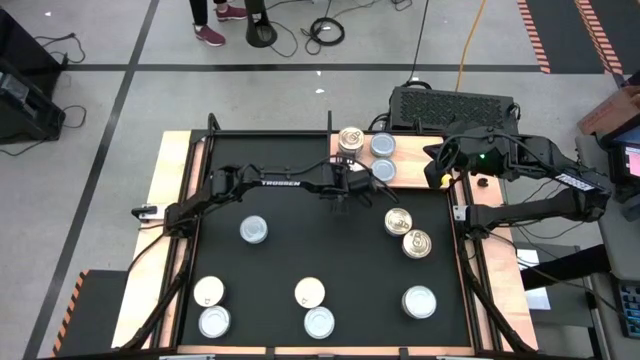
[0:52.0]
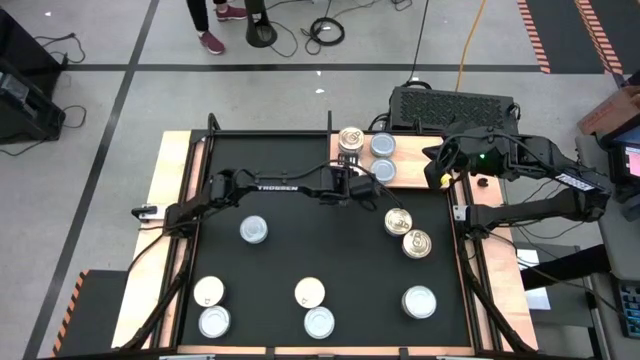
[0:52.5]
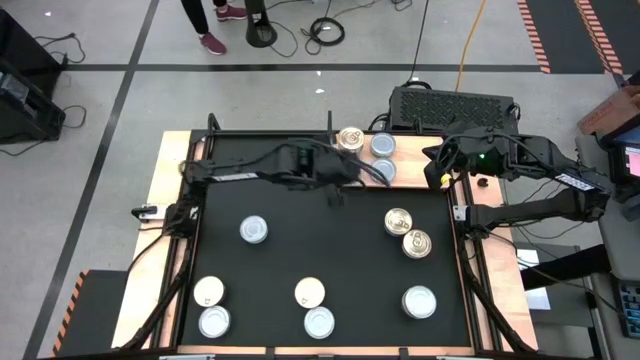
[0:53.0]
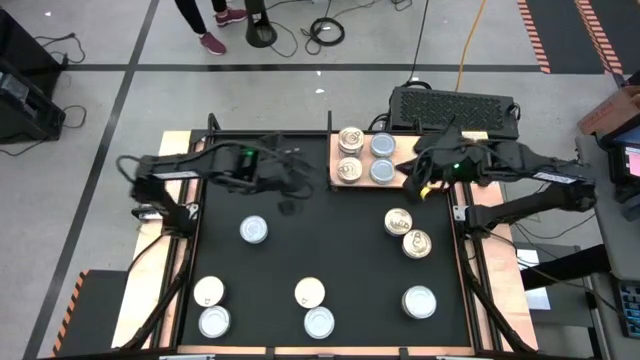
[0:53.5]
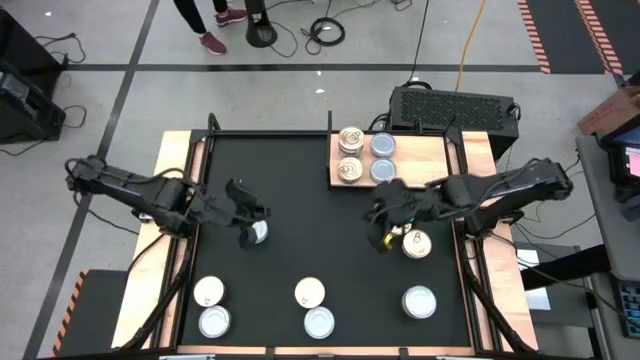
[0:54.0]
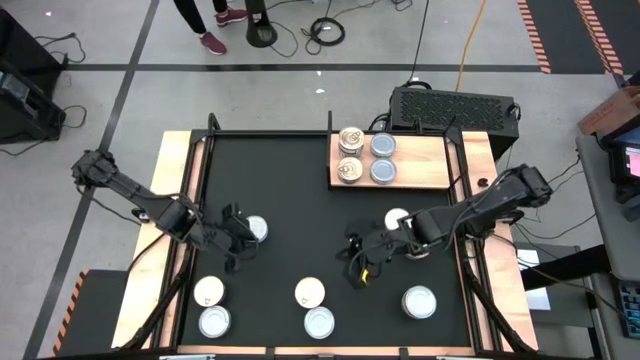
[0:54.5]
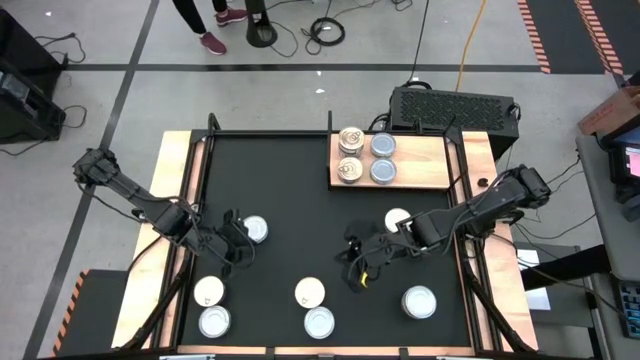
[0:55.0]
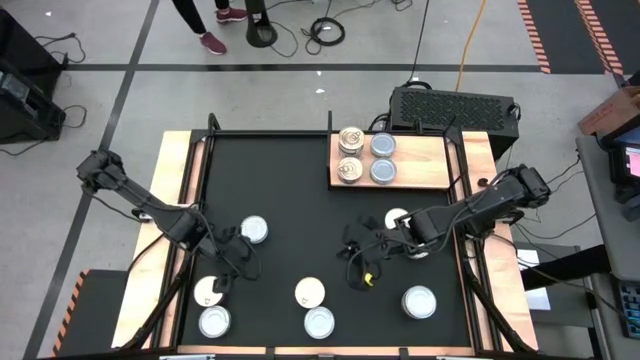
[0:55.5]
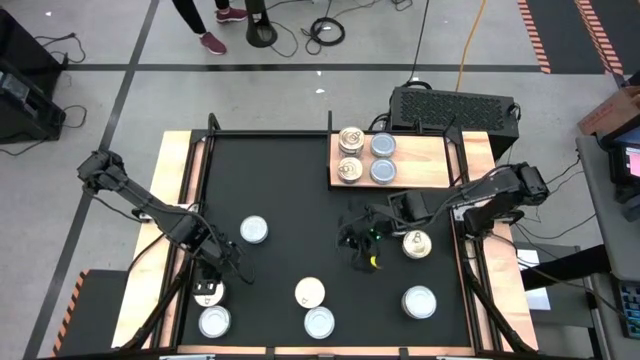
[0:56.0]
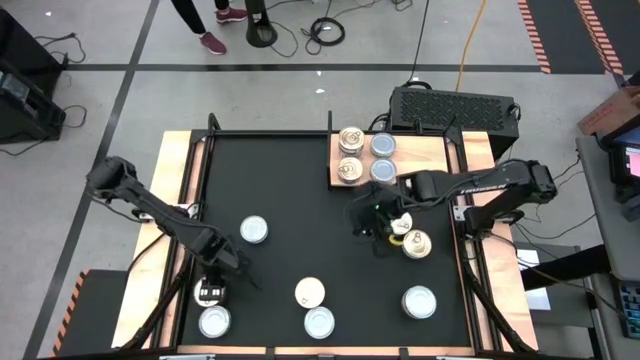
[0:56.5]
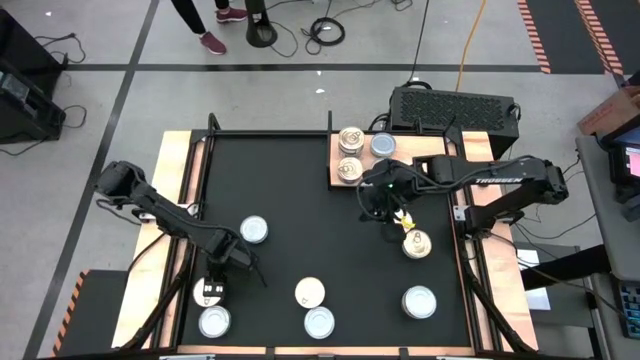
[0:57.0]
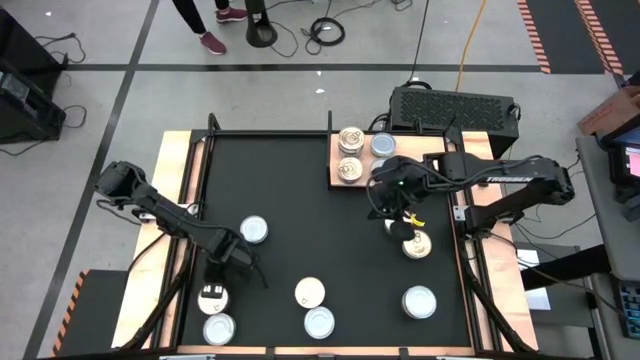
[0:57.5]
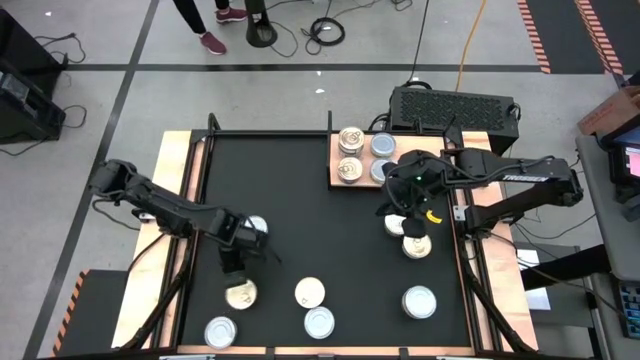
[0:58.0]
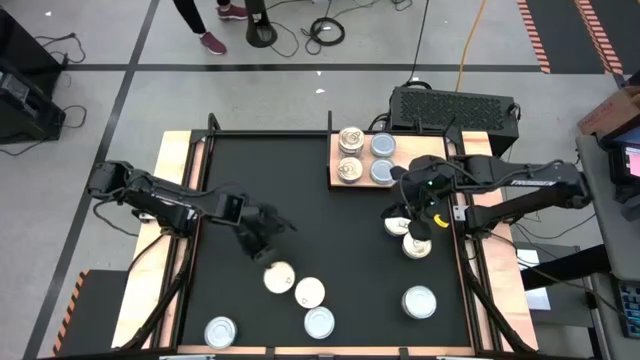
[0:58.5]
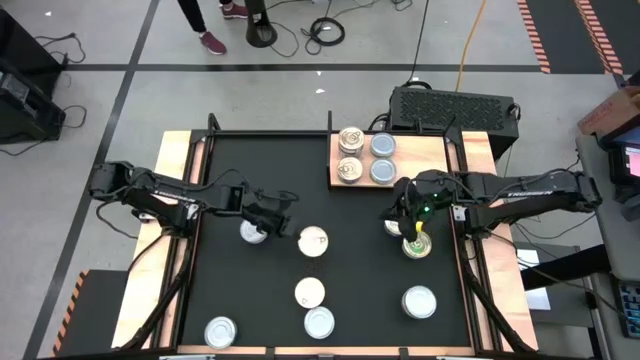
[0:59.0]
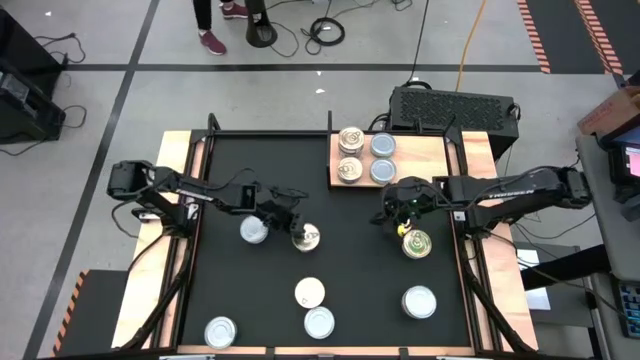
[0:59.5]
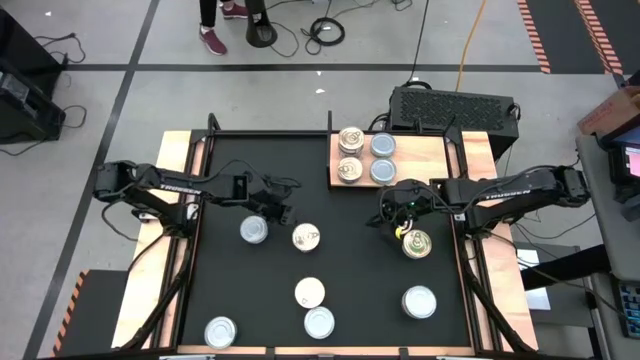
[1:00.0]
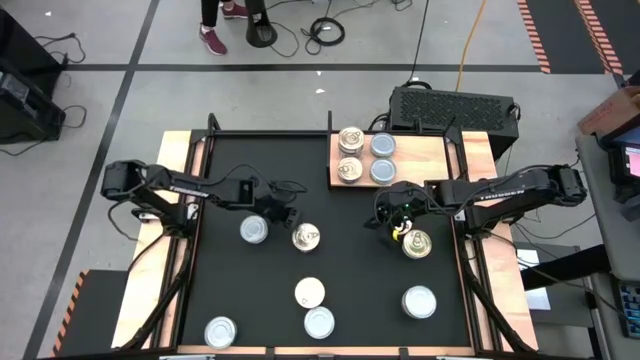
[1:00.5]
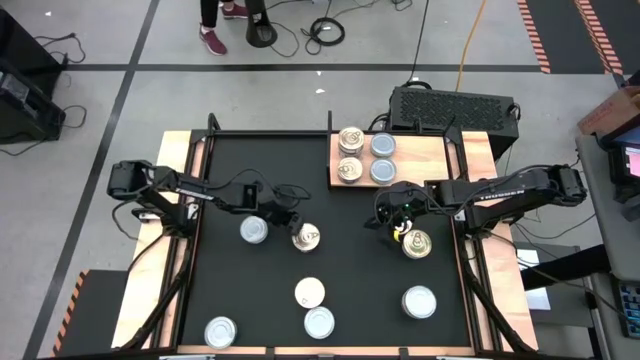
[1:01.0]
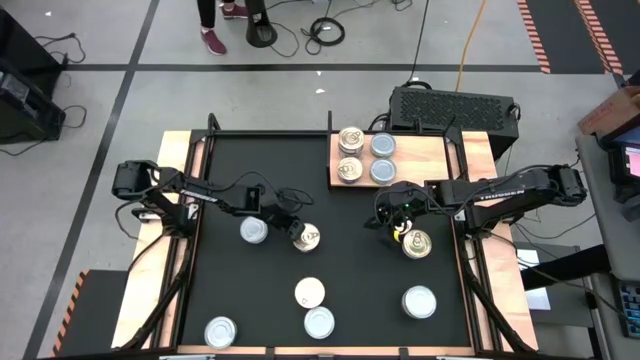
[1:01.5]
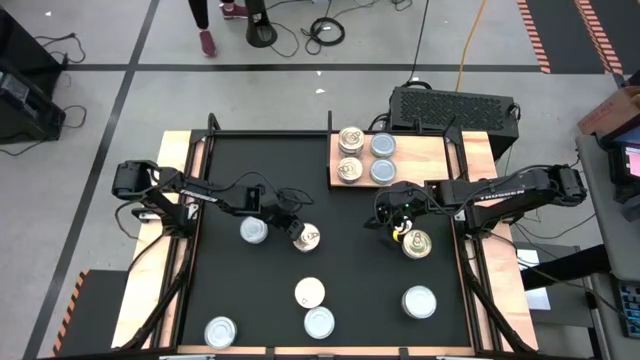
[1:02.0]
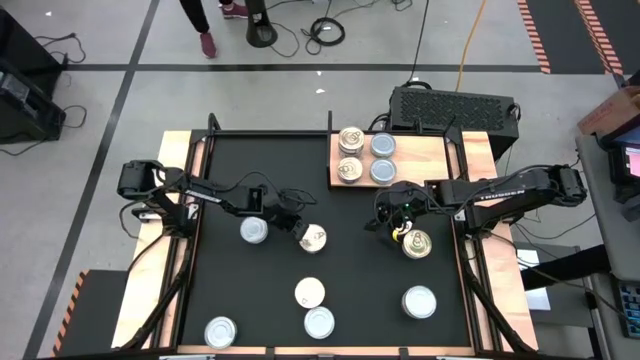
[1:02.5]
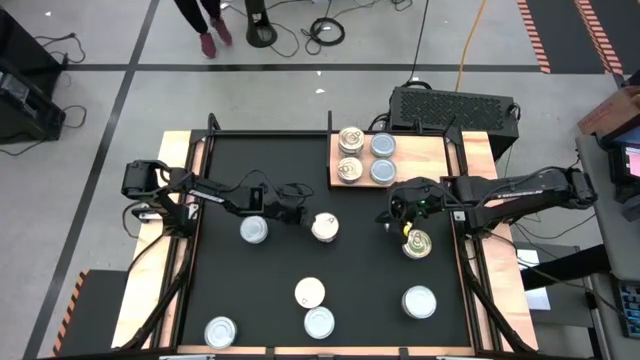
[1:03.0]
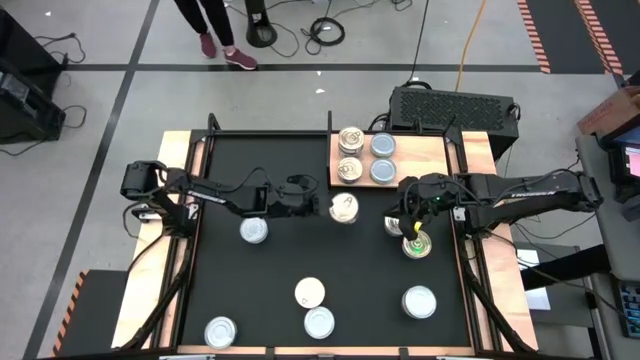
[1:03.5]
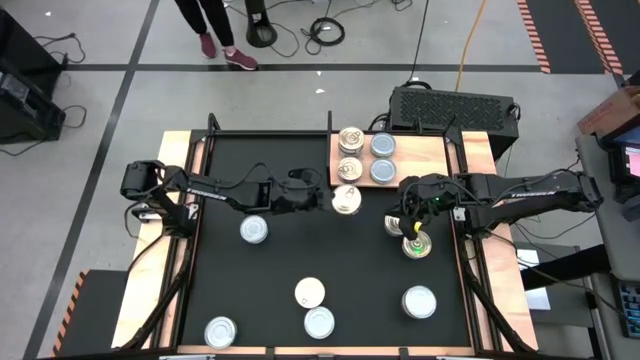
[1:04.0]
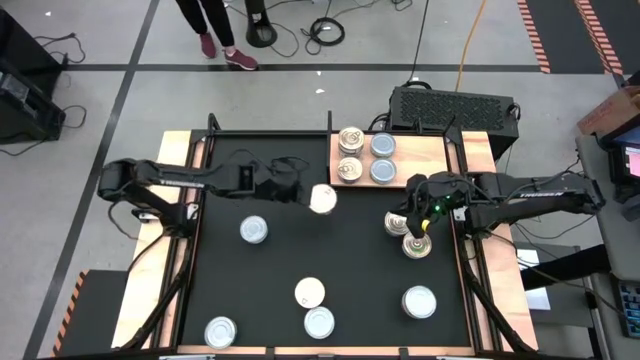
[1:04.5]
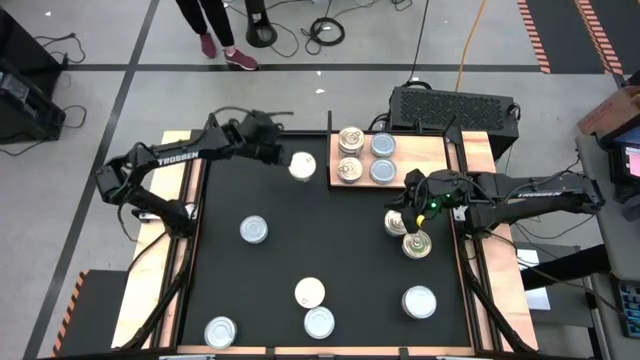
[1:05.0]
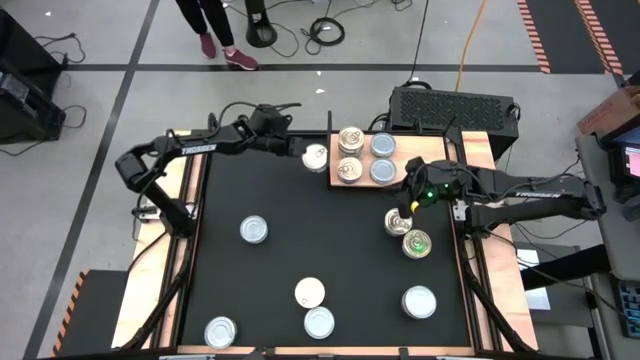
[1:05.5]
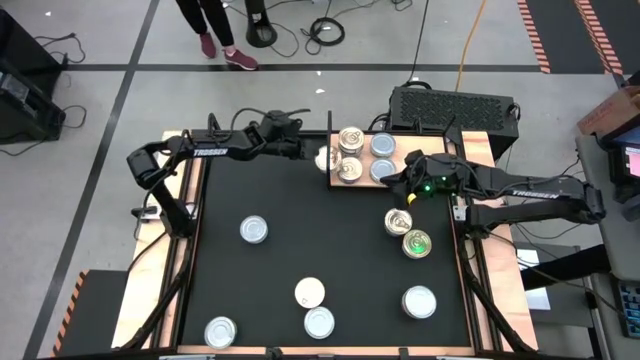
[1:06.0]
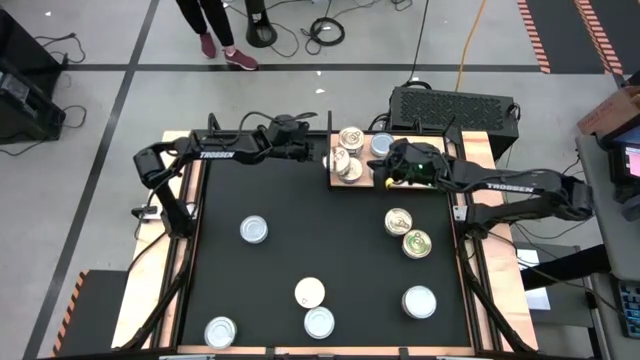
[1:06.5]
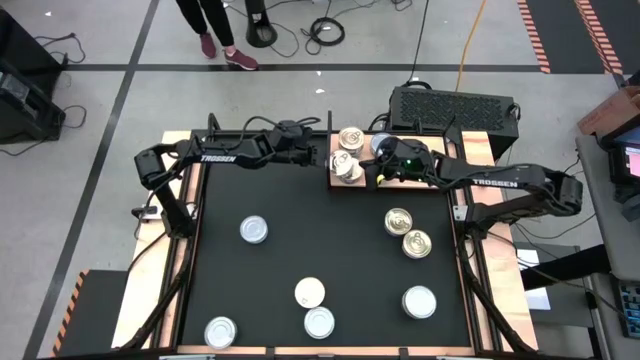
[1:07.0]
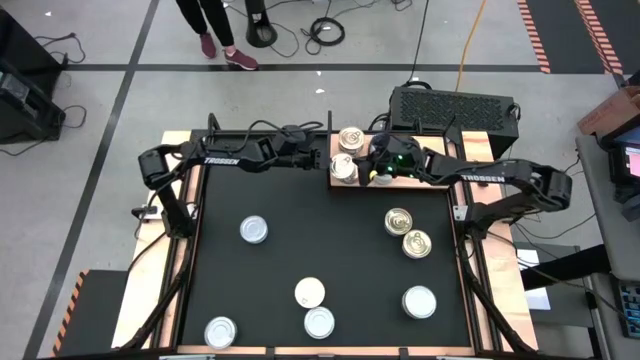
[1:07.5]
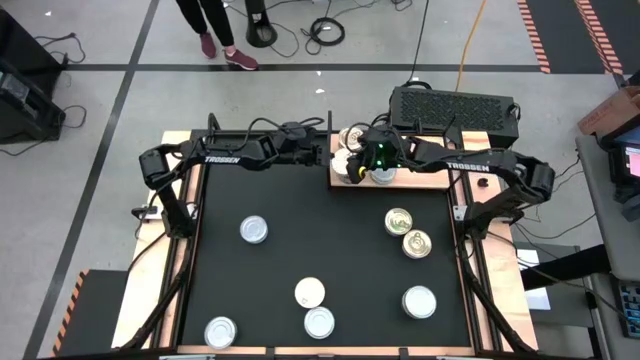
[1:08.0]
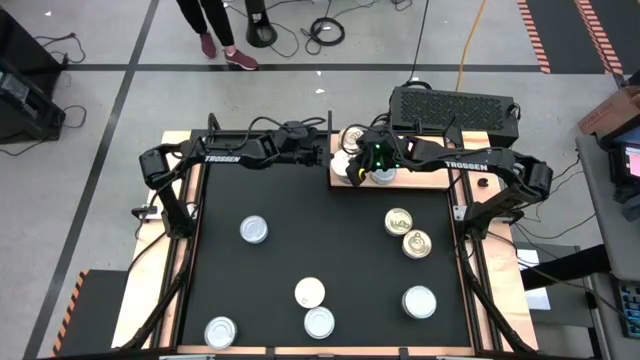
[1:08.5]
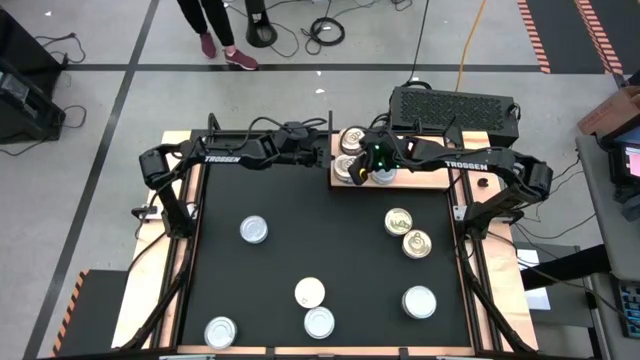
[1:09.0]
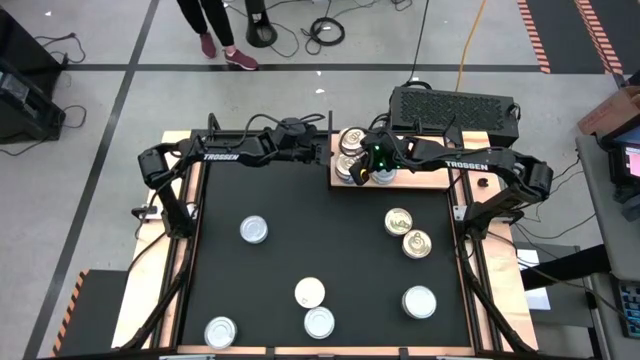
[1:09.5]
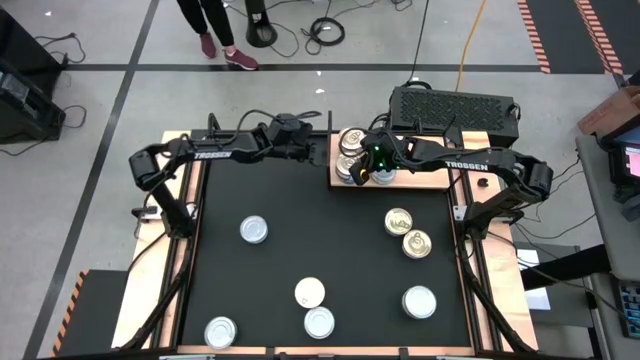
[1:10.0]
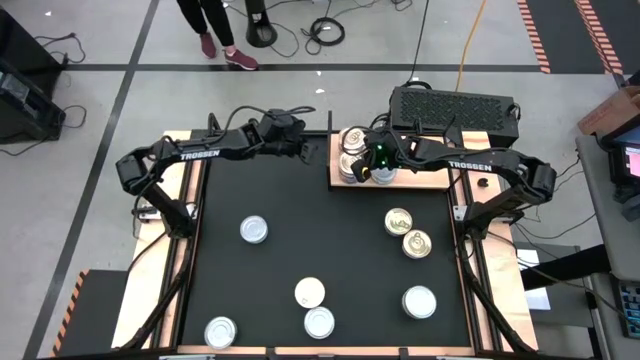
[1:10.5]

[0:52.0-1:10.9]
Task: Stack canned seafood by type on shelf
Stack the blue pink tuna can on top of the other blue pink tuna can on the shelf
